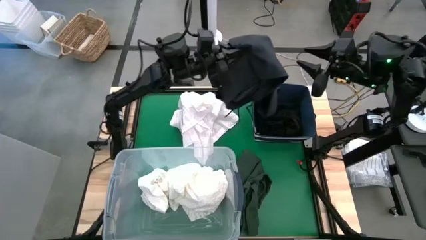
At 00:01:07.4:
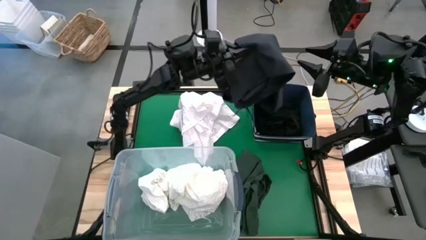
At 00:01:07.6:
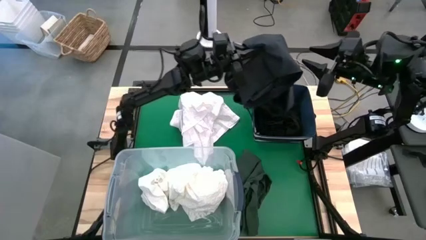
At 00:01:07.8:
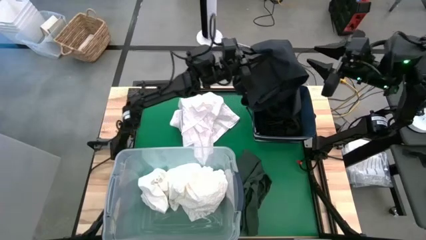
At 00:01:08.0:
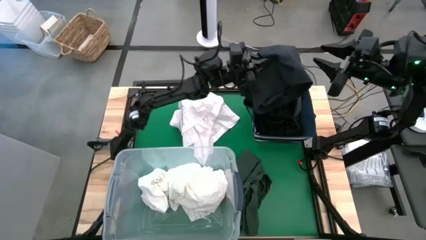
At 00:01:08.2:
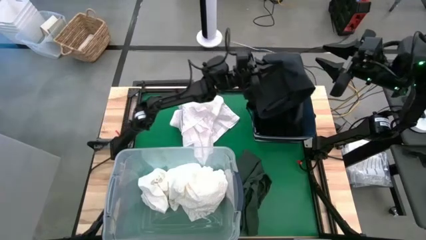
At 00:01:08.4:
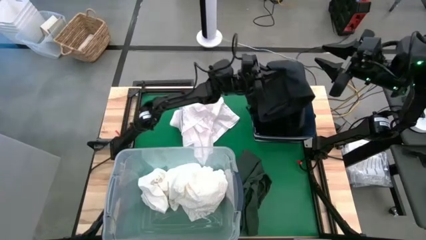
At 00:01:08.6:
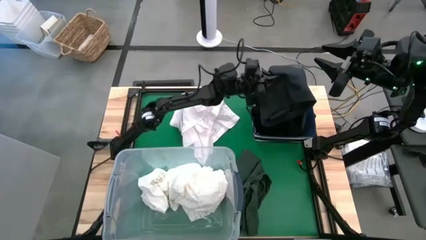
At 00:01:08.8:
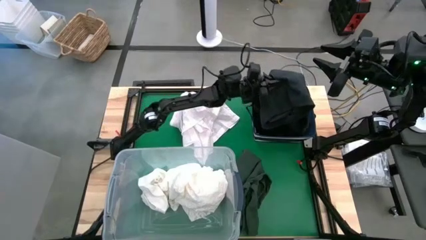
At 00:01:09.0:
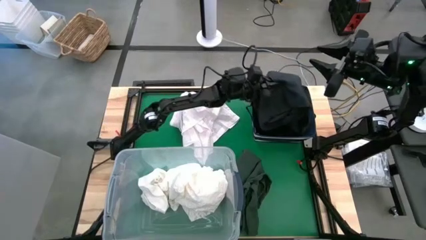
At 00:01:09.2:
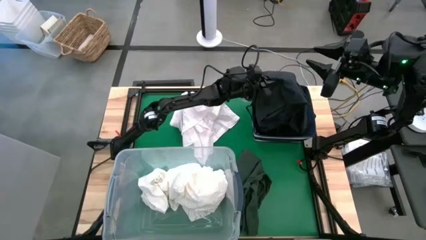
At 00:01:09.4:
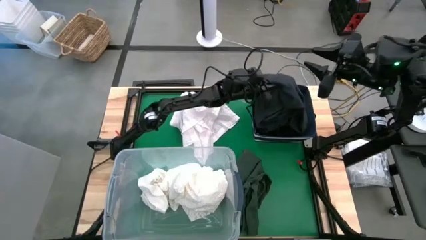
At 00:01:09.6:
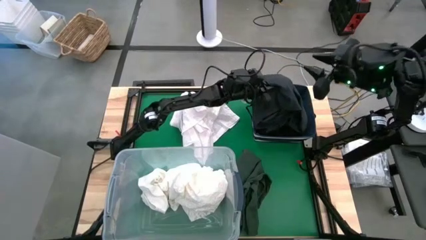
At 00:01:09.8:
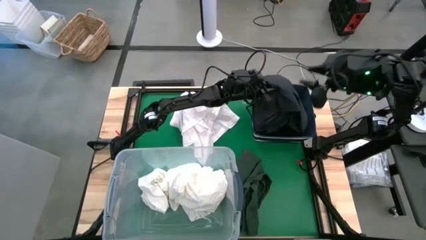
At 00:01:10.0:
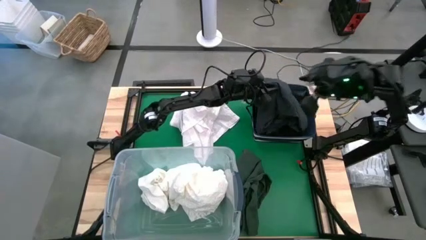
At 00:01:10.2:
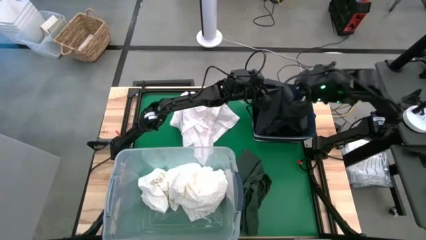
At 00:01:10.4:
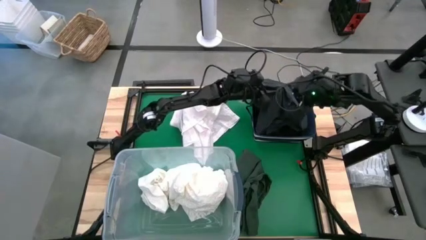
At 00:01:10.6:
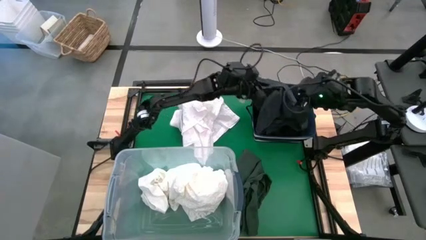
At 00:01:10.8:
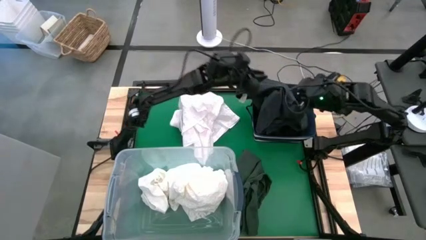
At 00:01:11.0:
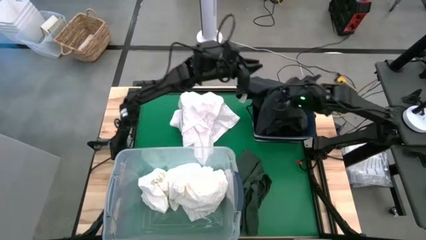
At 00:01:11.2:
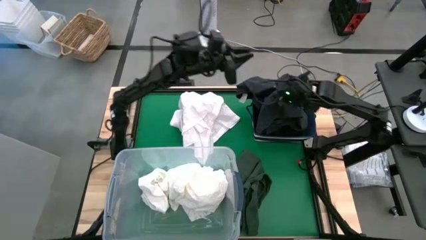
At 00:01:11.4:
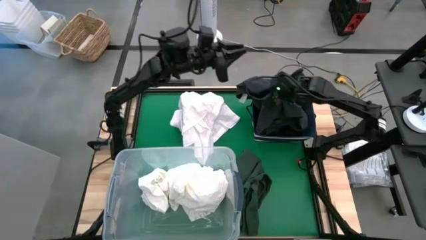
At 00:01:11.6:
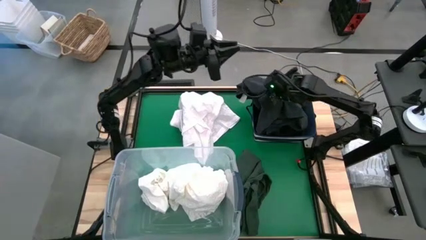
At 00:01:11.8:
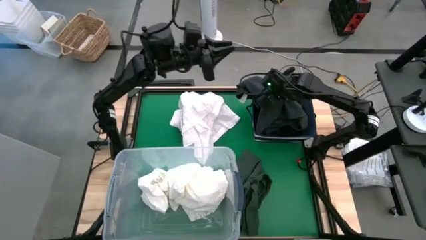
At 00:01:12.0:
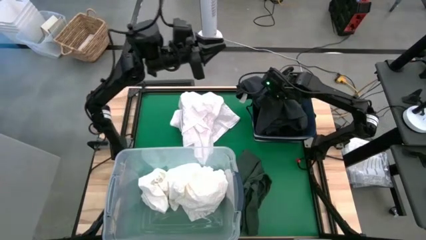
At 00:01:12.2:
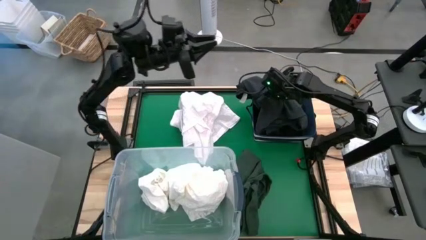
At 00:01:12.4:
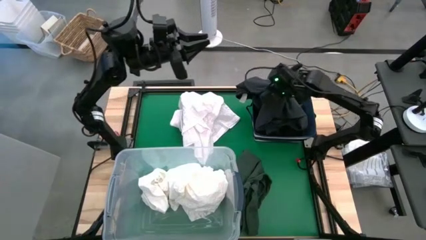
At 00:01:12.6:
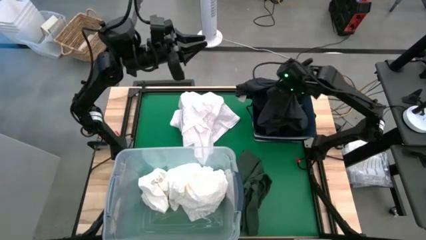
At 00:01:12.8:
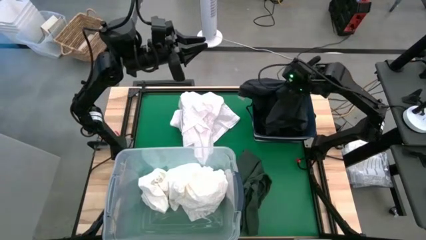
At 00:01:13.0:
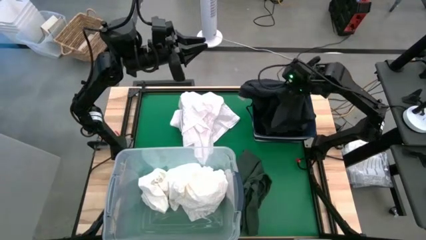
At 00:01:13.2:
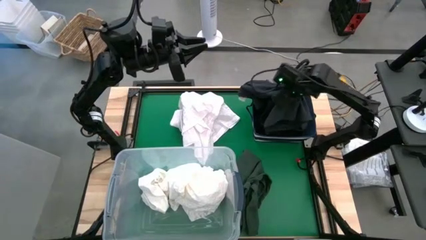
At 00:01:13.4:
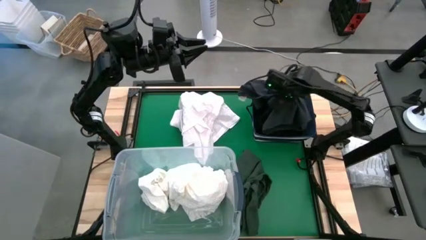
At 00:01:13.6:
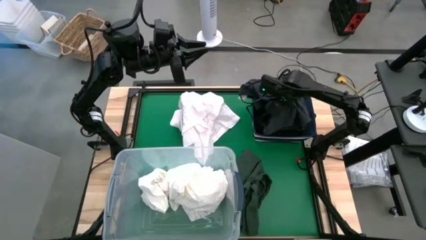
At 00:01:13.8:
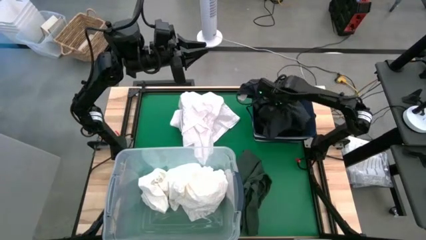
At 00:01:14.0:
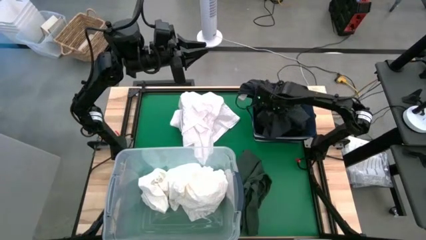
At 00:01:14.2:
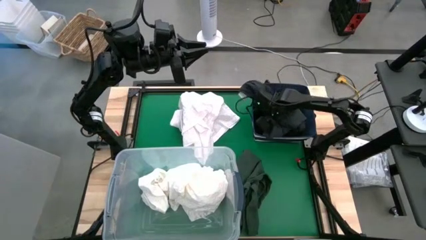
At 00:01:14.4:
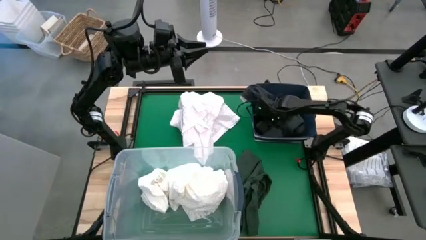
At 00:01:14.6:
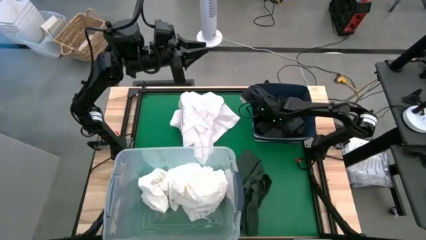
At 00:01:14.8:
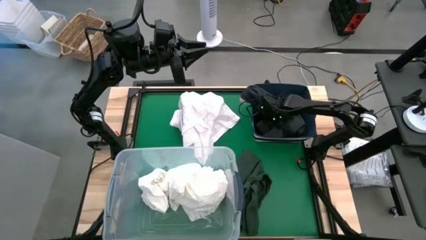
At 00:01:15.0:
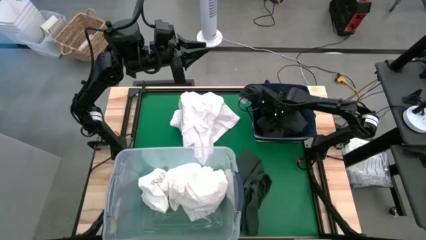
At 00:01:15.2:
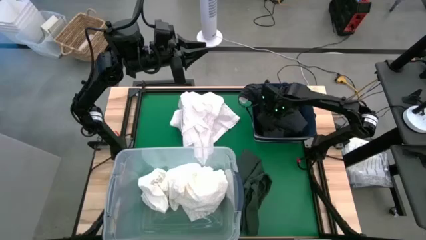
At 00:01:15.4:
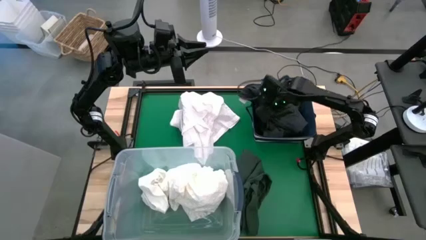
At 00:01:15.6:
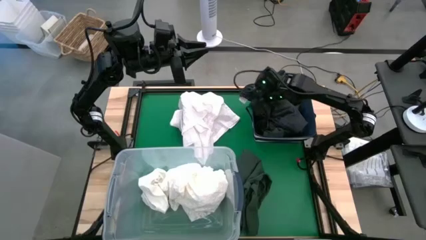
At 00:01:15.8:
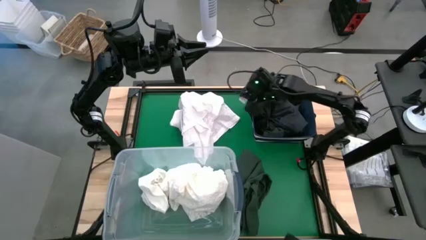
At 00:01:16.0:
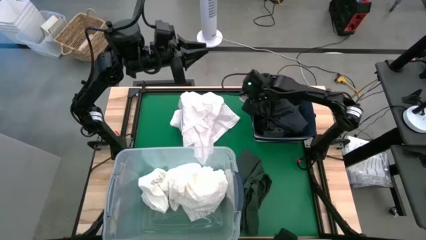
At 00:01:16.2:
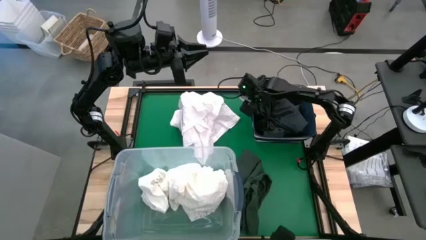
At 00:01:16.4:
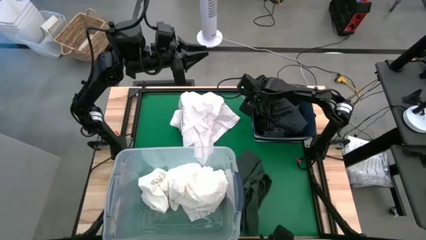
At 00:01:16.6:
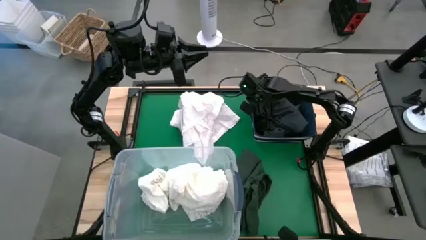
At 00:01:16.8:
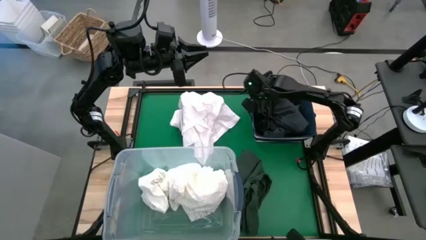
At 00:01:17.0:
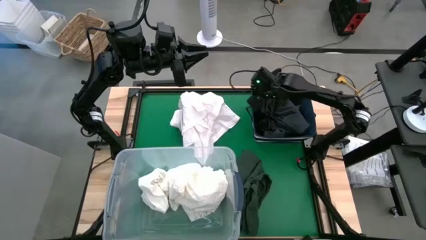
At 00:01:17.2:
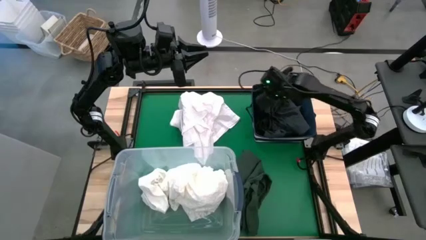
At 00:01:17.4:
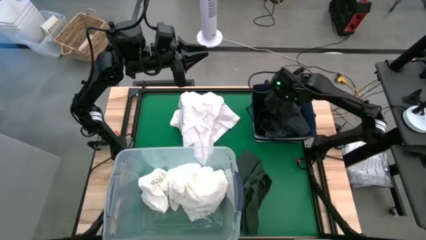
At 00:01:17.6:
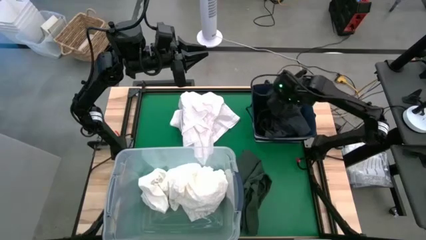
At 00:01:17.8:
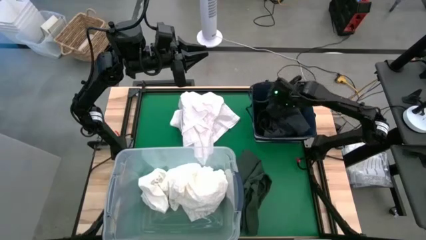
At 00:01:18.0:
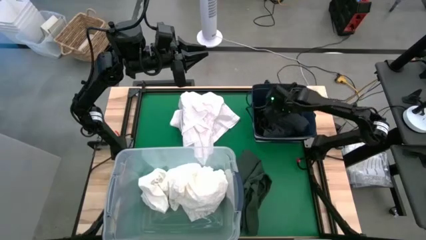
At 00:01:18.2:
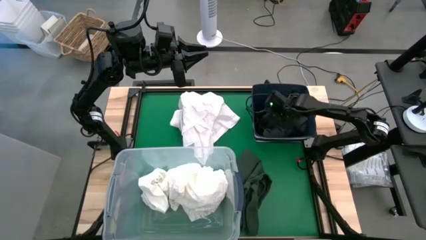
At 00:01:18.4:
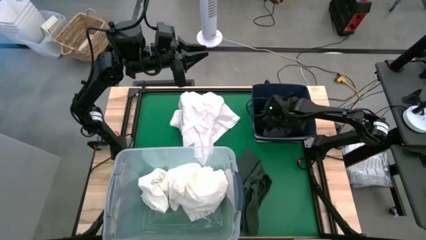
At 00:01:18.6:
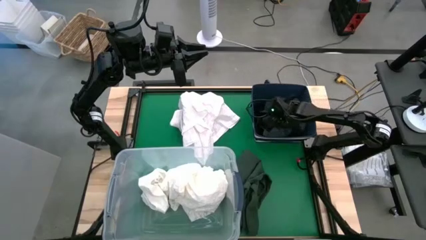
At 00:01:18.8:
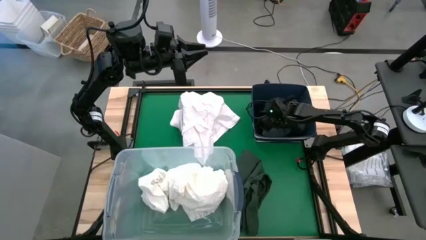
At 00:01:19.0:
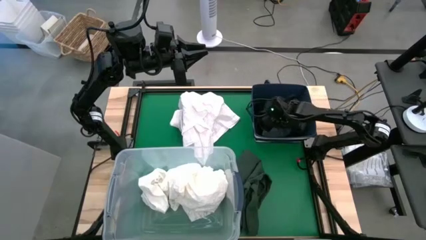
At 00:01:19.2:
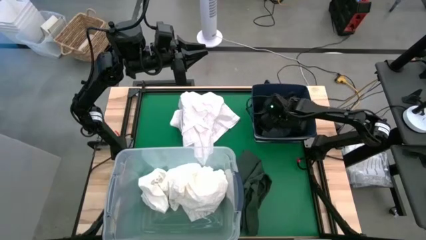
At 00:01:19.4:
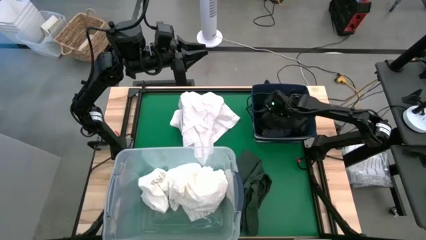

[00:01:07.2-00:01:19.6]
Put the black short pants into the blue laundry organizer
